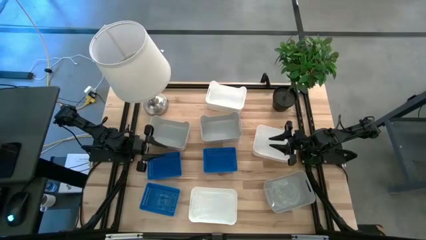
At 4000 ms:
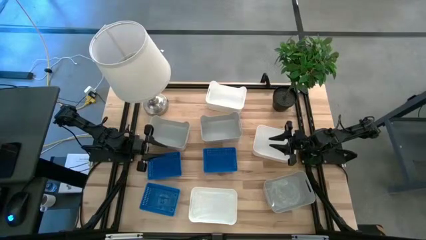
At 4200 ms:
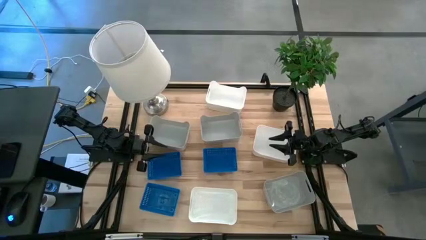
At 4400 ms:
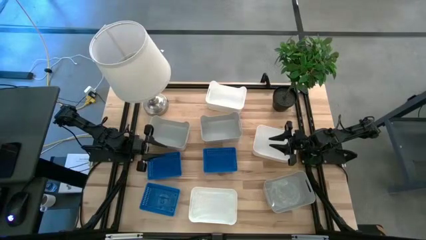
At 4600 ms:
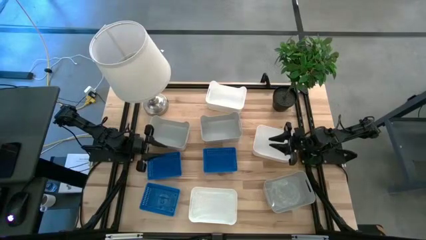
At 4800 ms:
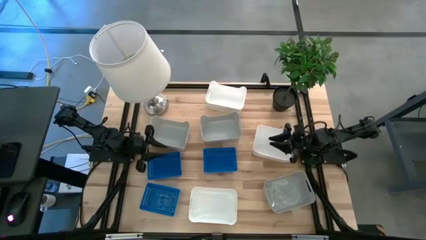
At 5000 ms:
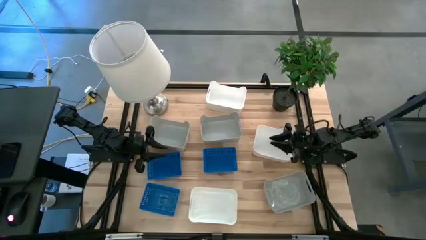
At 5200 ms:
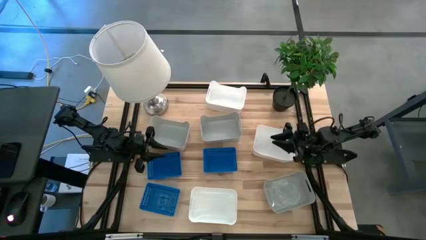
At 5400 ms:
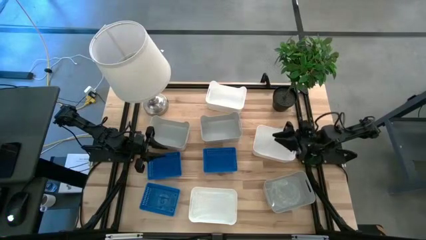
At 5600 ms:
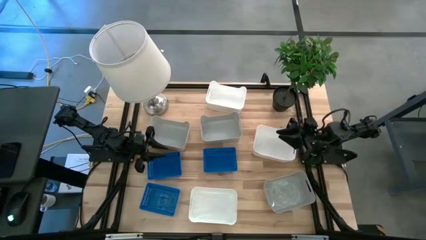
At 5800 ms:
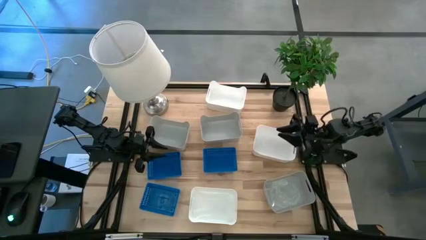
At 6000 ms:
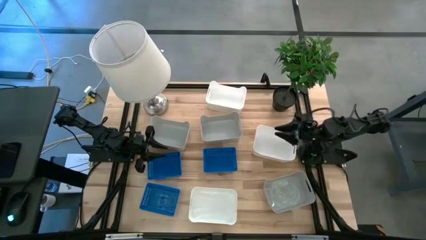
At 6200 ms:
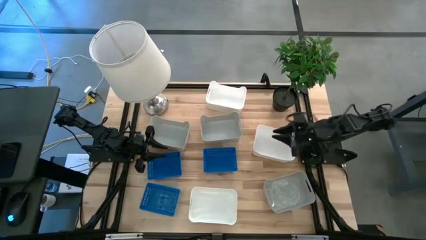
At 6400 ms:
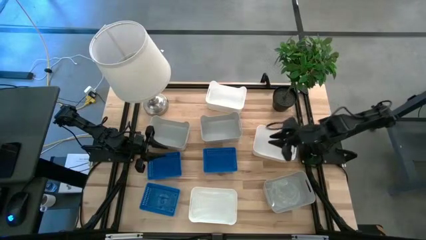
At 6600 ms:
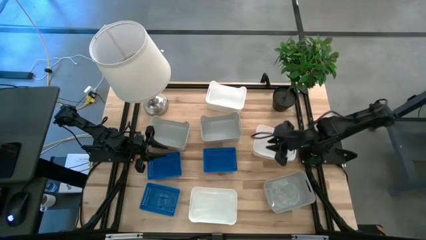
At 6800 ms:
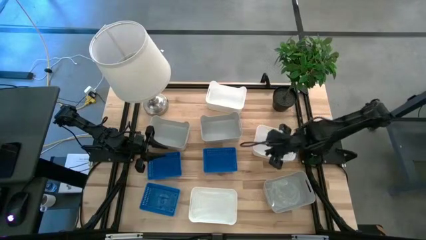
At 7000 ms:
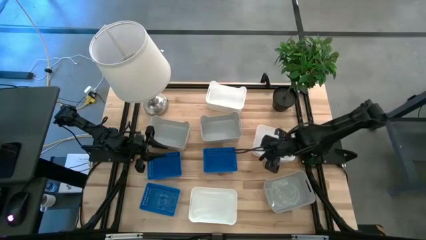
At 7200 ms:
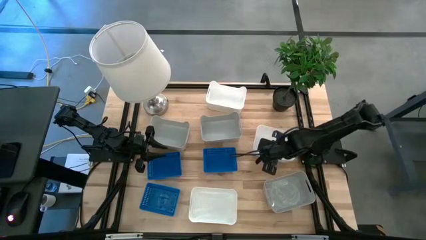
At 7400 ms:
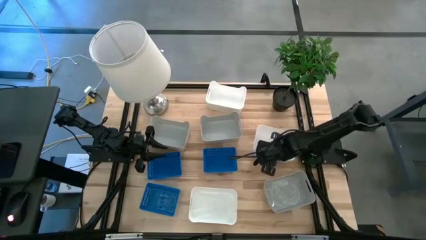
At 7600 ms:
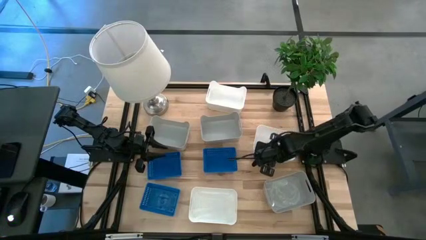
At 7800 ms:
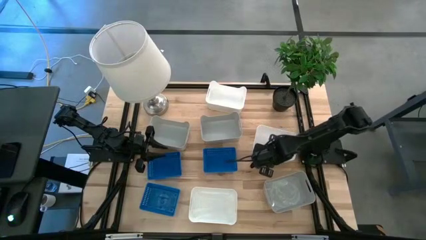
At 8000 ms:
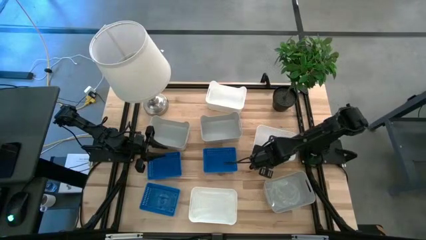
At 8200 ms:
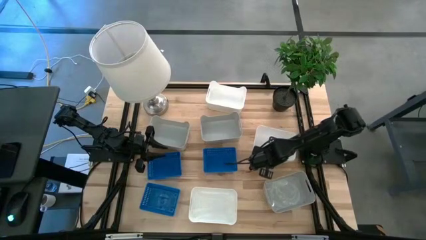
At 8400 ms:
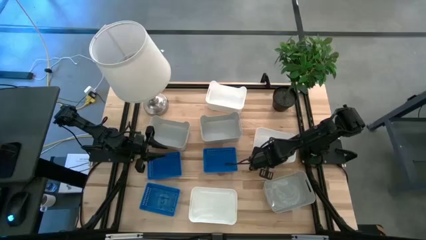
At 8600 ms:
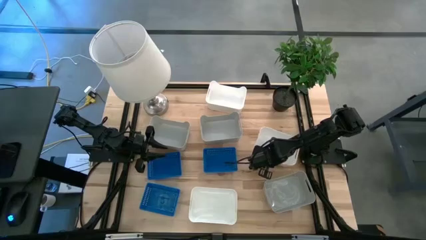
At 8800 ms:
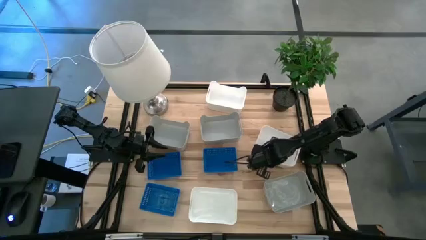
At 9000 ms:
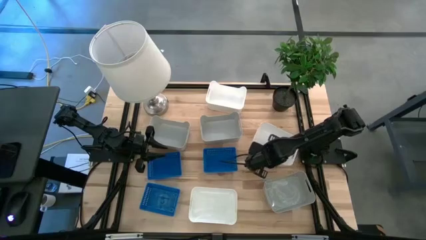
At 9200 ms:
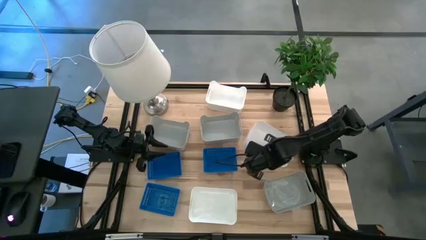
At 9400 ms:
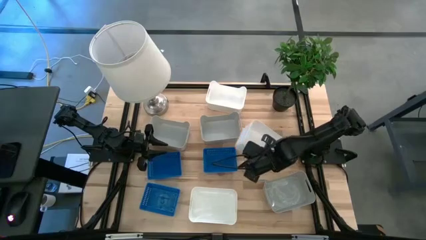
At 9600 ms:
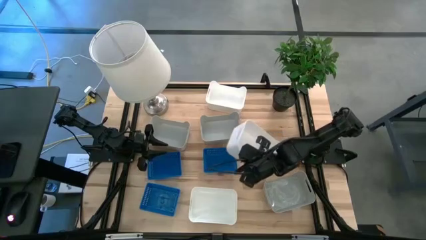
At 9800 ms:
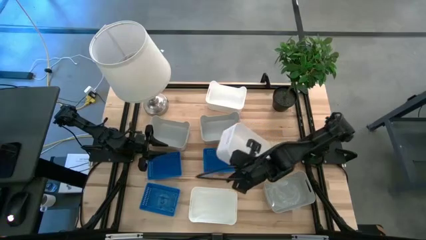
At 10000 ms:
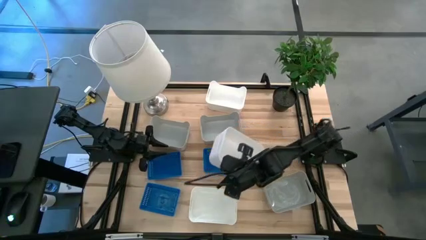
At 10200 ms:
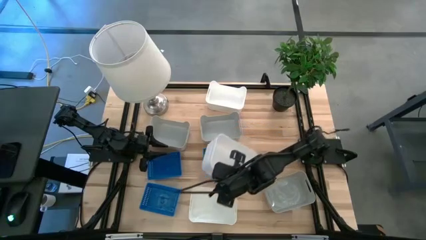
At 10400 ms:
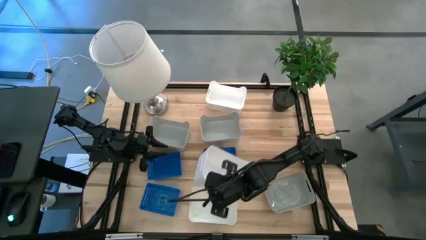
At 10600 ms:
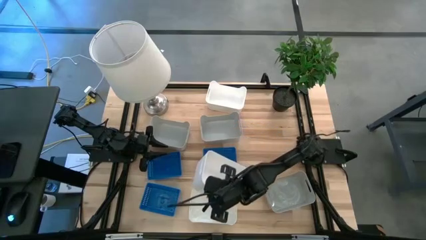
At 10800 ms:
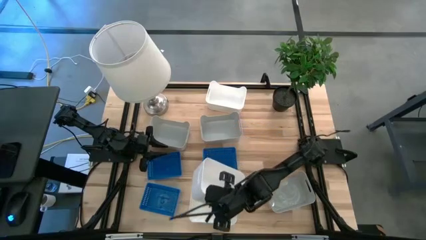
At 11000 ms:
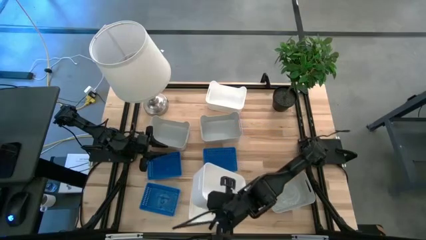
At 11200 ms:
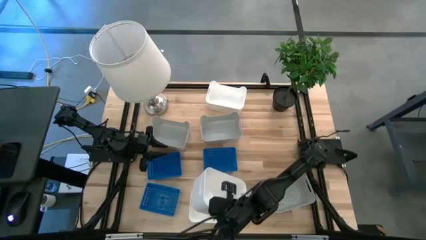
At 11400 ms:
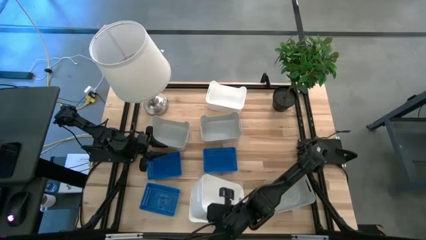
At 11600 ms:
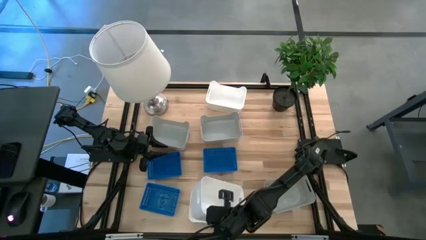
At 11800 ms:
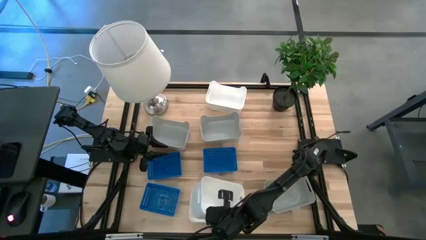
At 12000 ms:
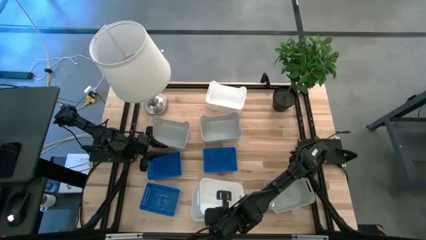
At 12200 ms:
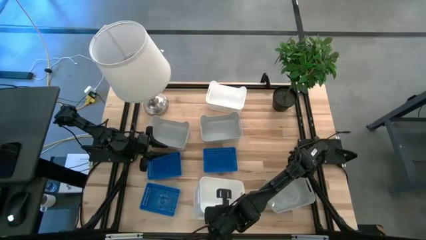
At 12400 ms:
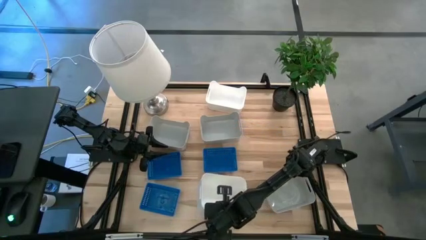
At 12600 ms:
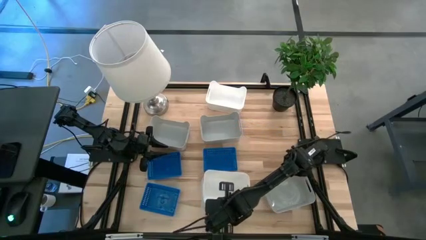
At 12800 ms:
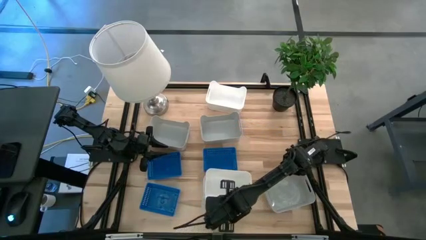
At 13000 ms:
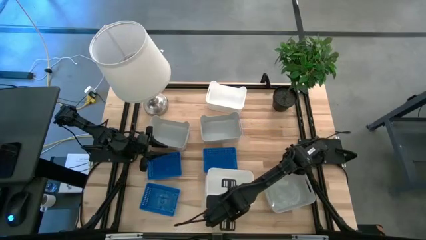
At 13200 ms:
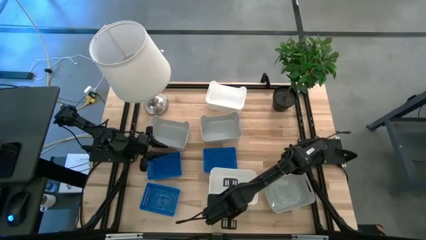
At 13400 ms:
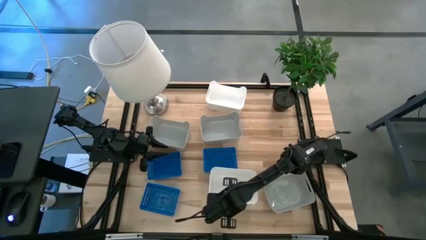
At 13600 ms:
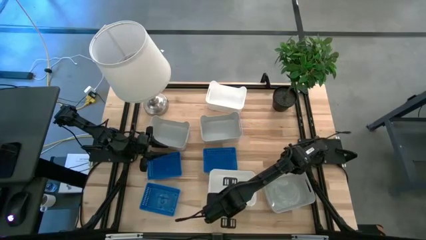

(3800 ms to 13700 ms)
Stack the middle white bin on the bottom white bin

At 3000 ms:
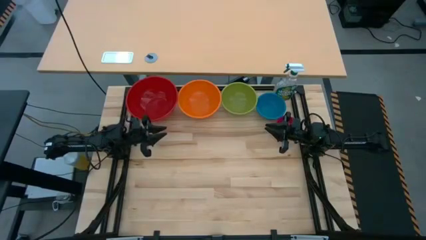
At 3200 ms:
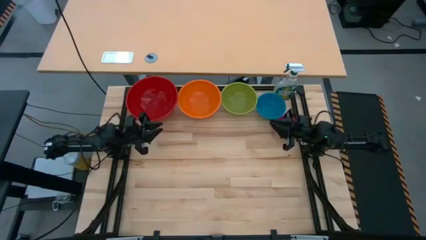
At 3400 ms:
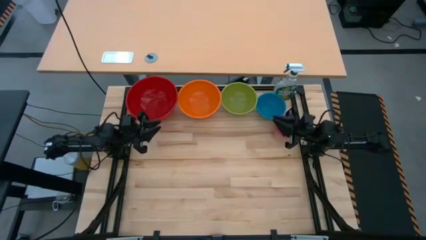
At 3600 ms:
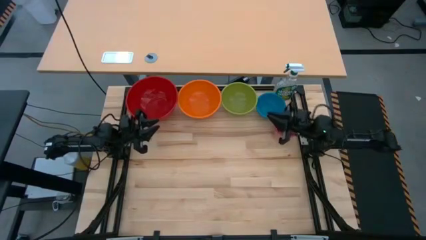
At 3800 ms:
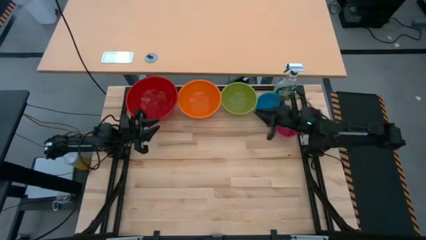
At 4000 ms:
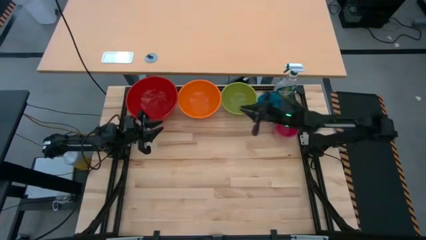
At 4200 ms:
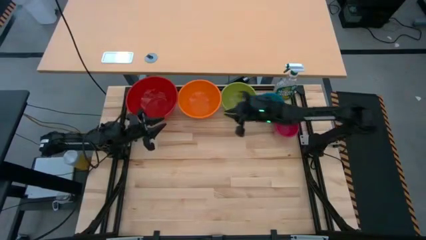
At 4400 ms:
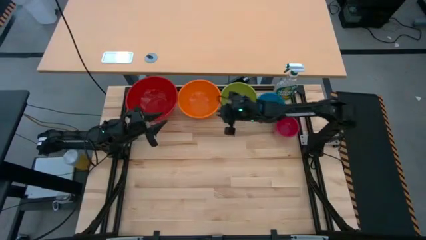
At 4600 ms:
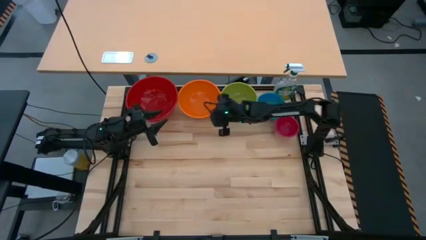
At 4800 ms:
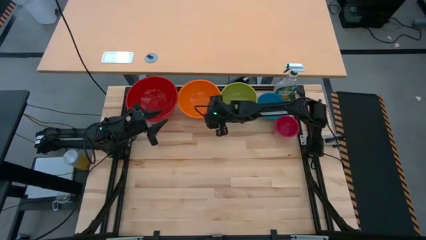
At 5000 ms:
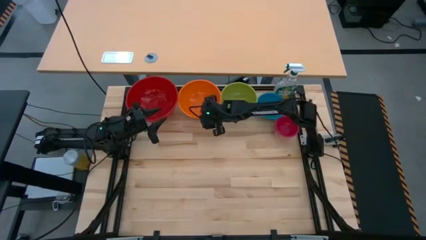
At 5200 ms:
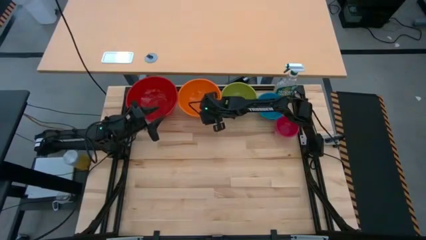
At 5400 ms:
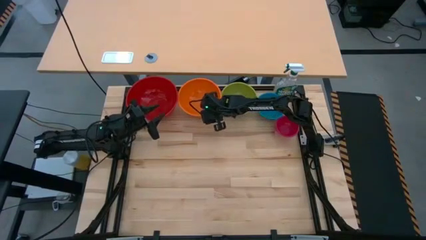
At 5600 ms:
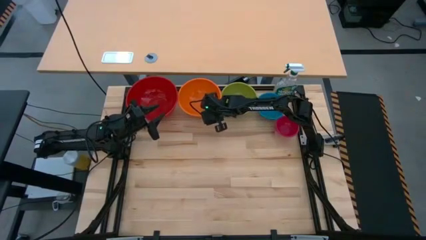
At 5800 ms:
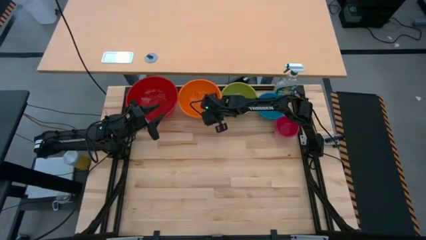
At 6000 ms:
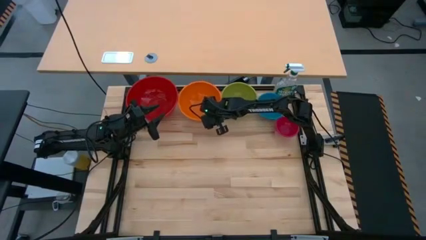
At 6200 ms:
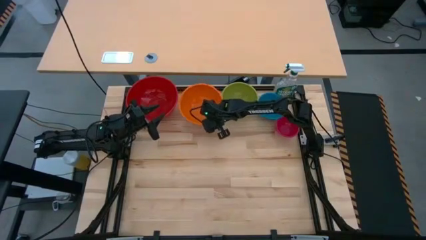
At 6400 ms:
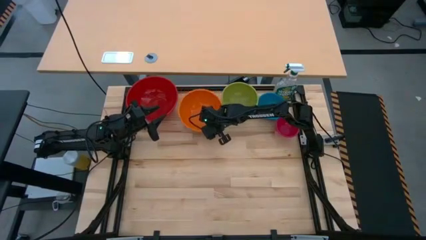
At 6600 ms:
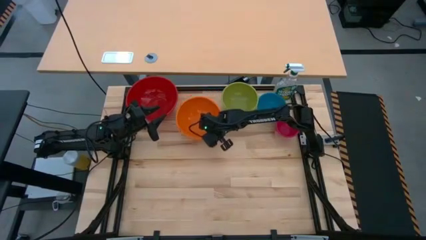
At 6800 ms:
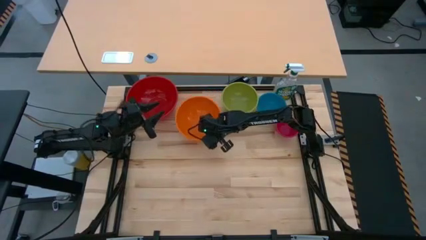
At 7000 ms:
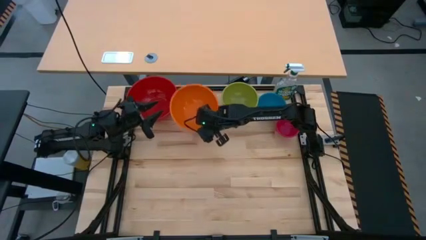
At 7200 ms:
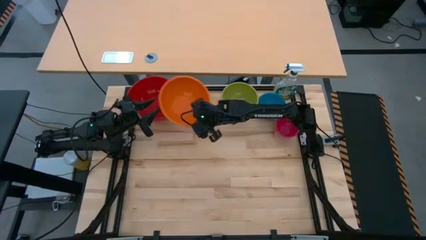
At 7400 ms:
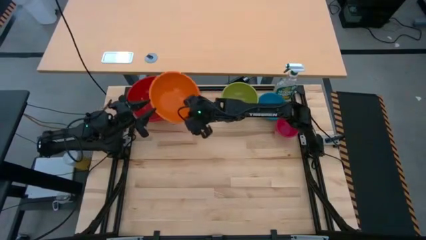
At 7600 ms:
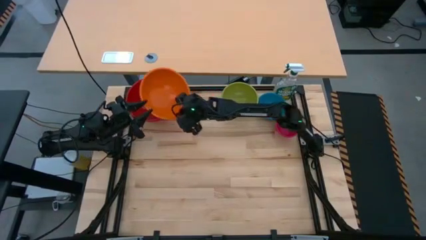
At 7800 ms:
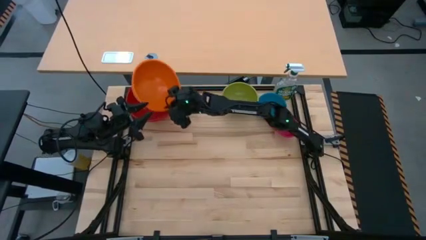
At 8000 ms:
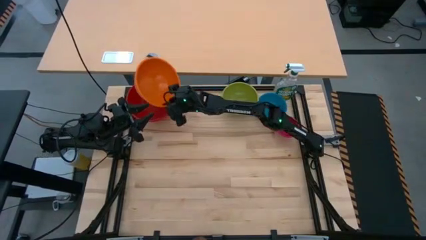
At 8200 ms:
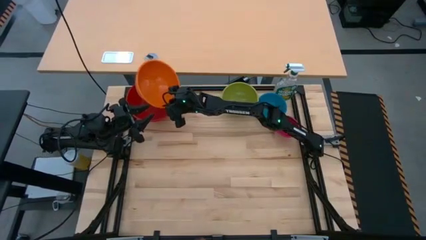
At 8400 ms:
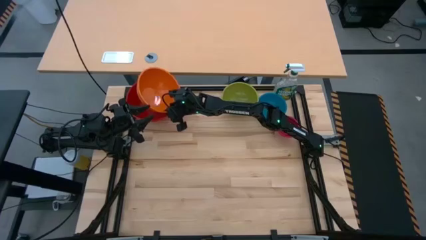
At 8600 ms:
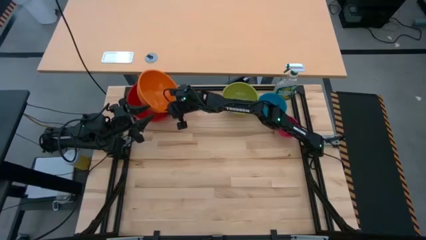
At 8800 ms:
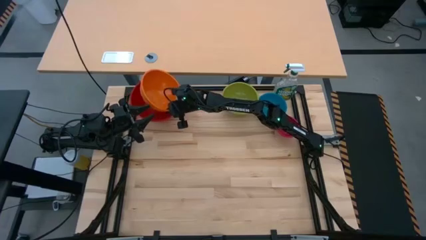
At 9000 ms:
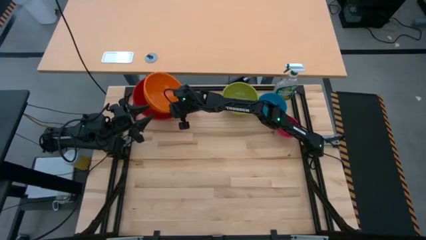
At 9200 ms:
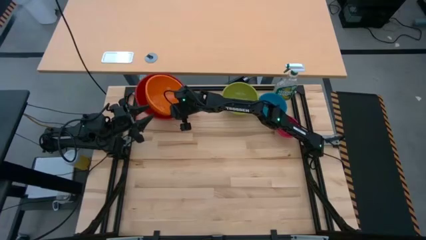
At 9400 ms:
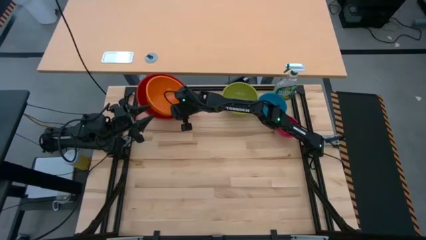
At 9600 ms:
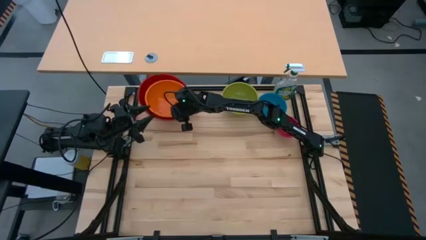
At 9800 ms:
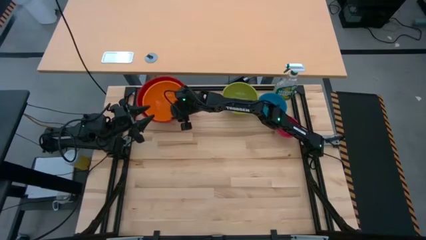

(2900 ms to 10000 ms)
Stack the orange bowl on top of the red bowl
